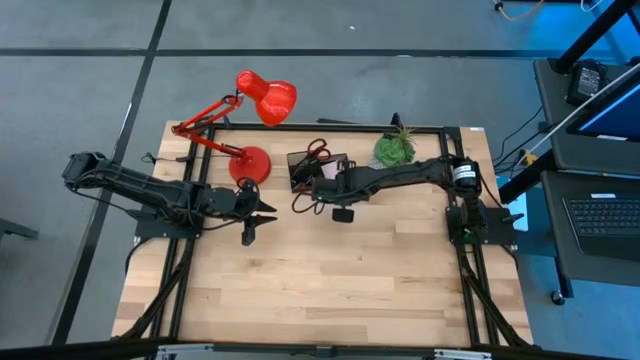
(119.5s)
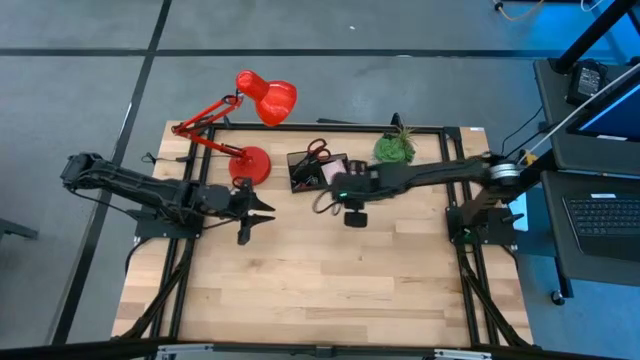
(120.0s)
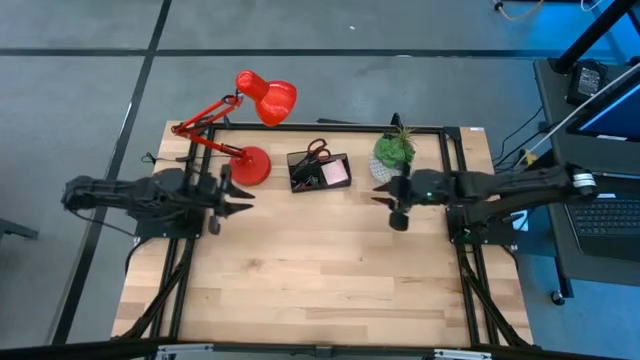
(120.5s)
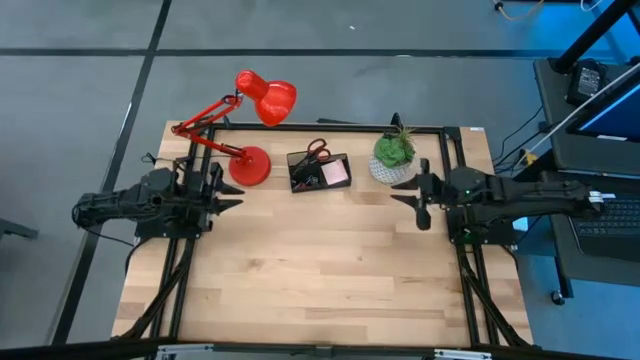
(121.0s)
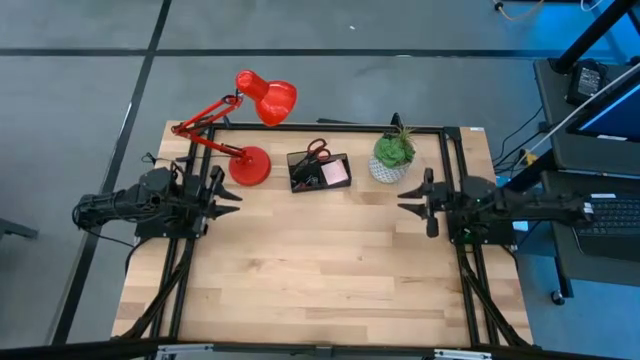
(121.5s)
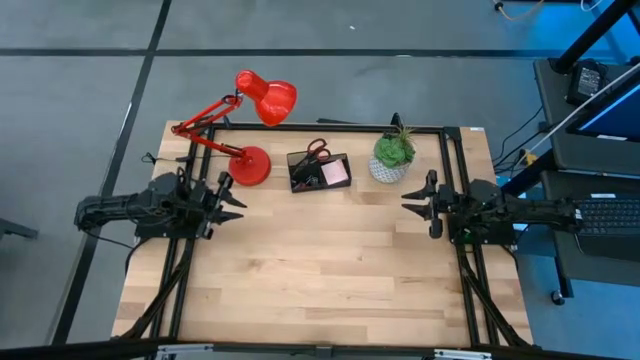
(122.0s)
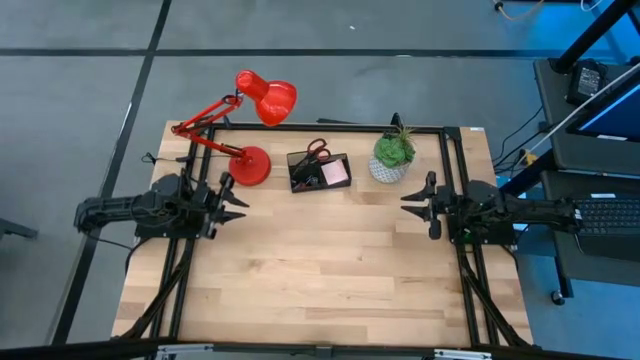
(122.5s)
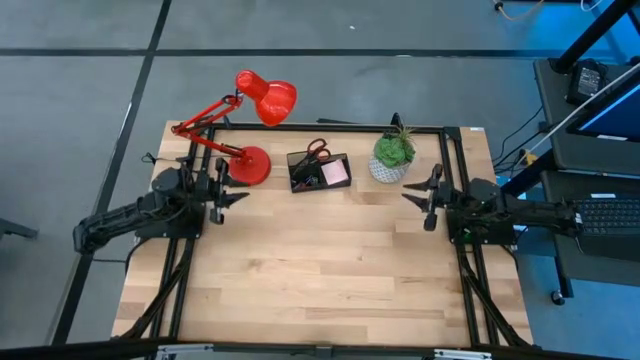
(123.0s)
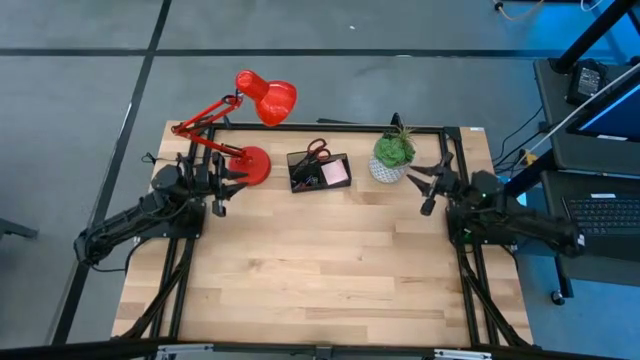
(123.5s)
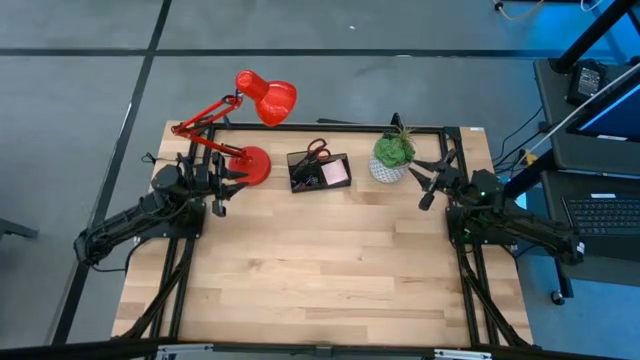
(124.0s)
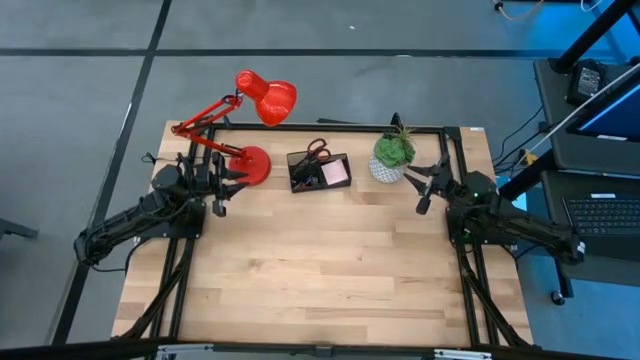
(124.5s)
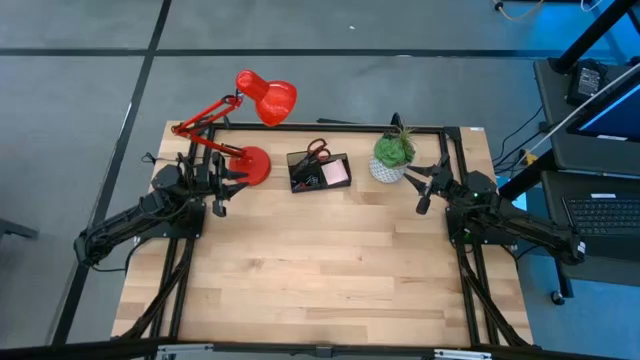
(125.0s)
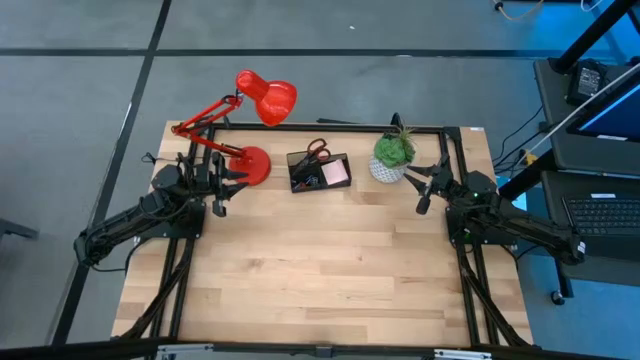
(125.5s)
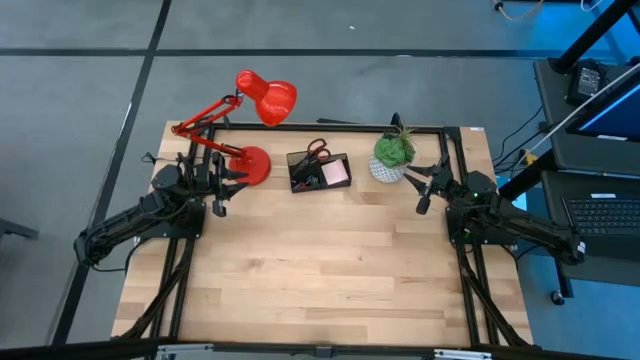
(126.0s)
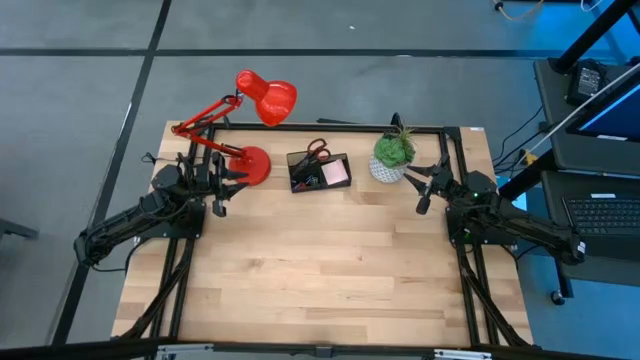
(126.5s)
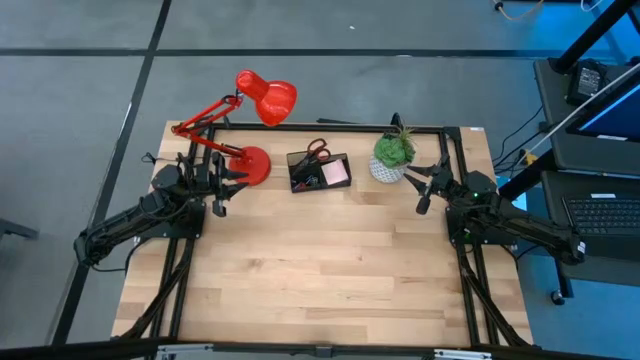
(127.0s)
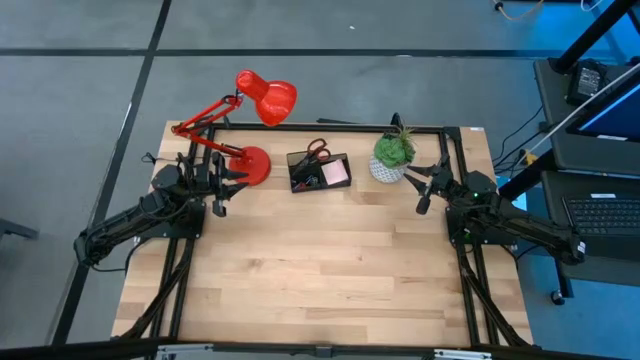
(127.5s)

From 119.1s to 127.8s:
Task: Pick and place office supplies into organizer
Return to Home Position

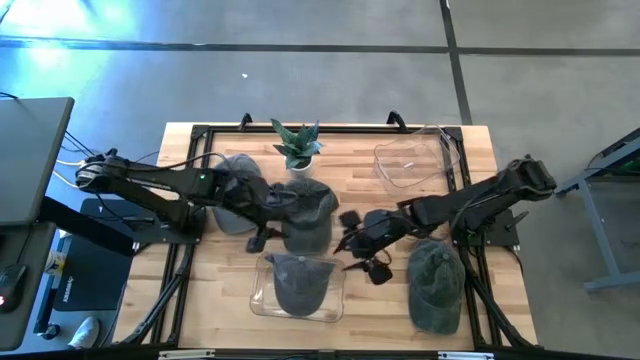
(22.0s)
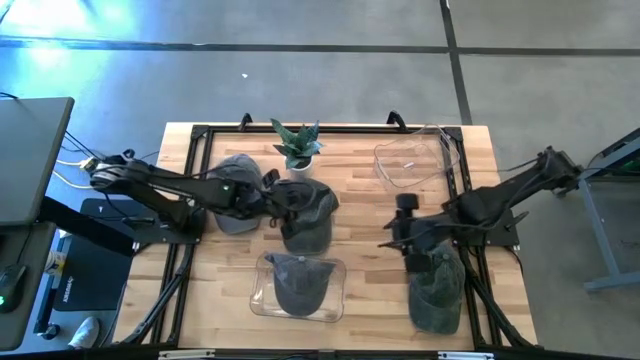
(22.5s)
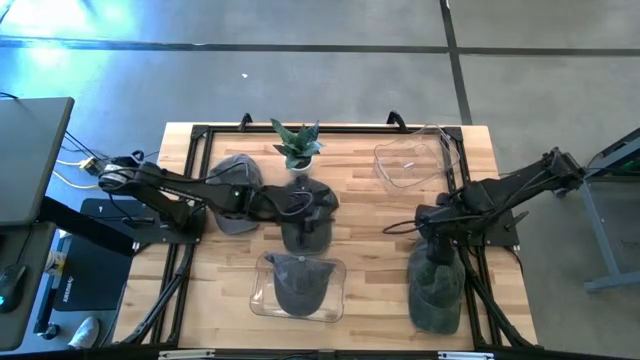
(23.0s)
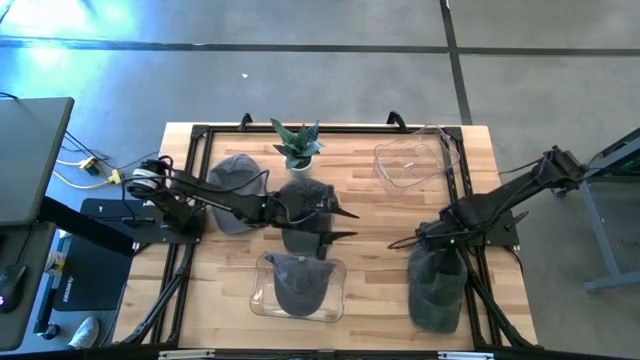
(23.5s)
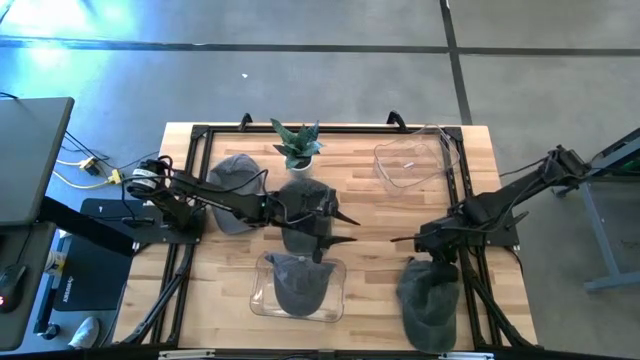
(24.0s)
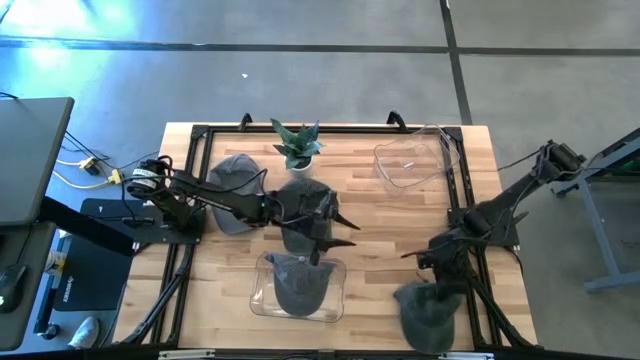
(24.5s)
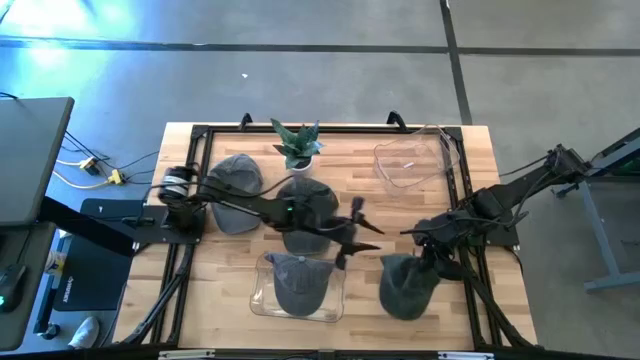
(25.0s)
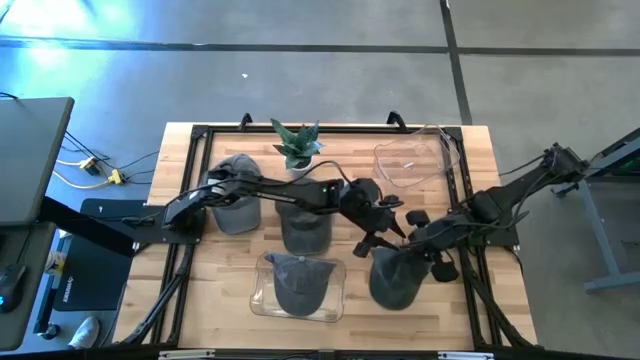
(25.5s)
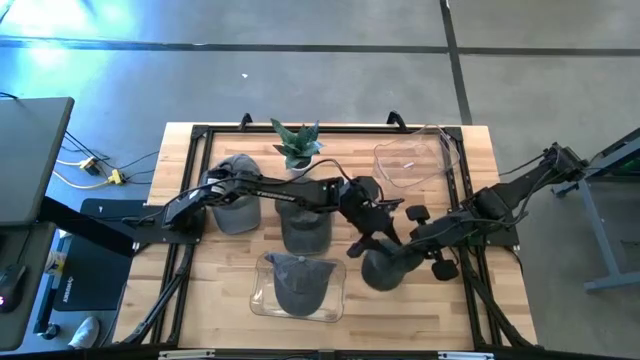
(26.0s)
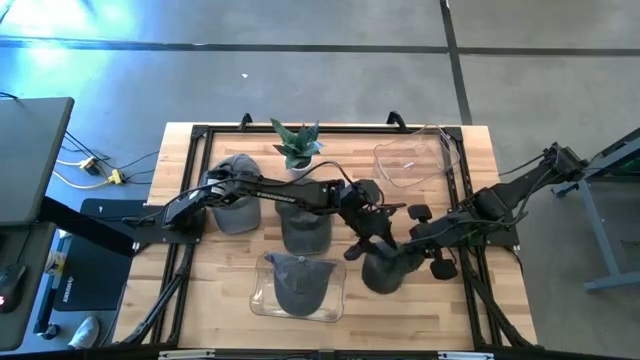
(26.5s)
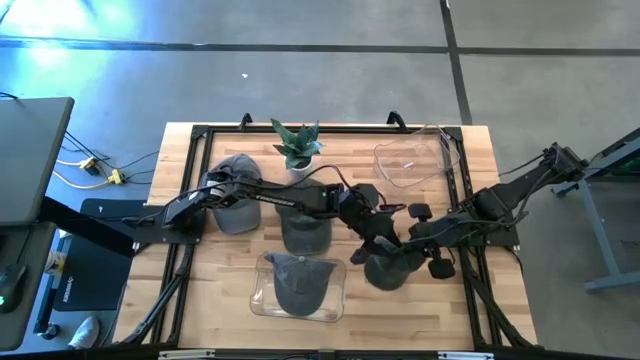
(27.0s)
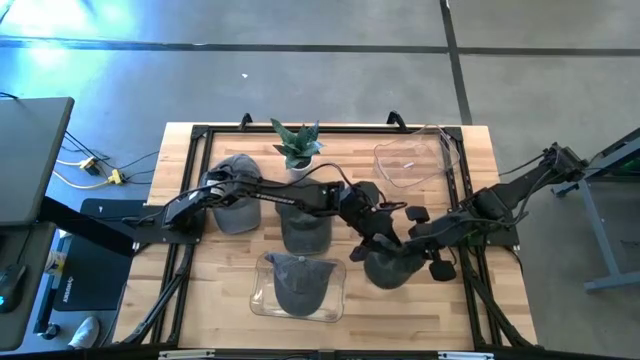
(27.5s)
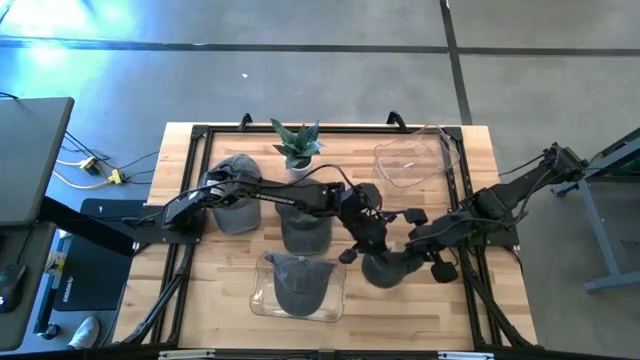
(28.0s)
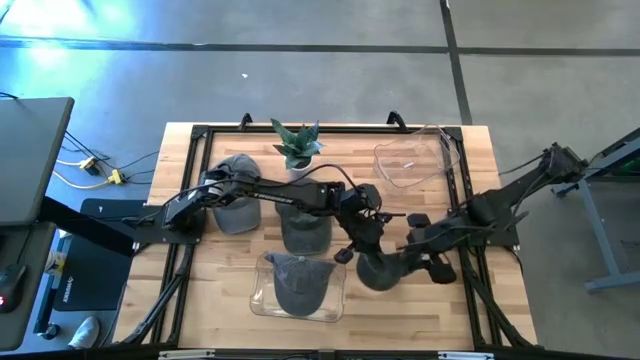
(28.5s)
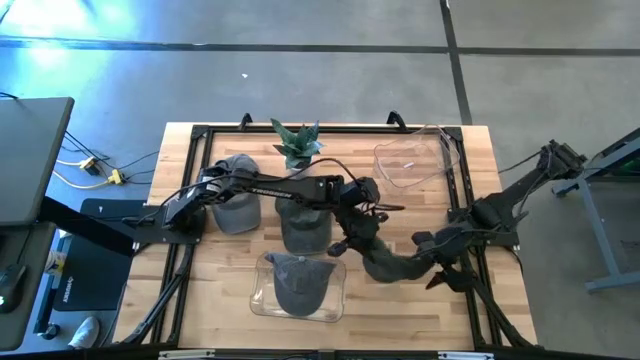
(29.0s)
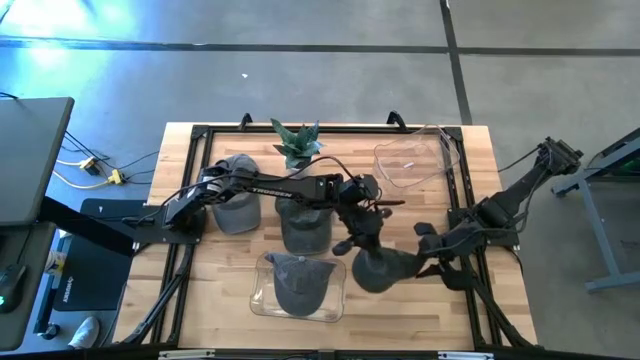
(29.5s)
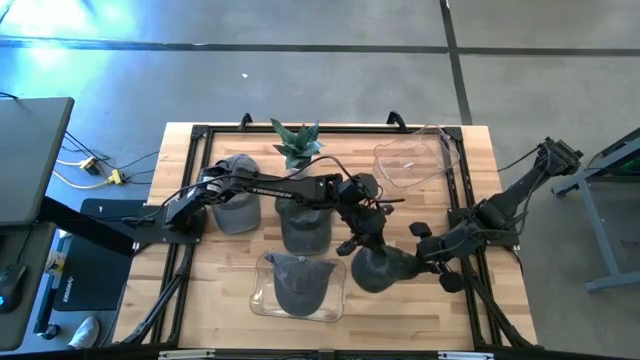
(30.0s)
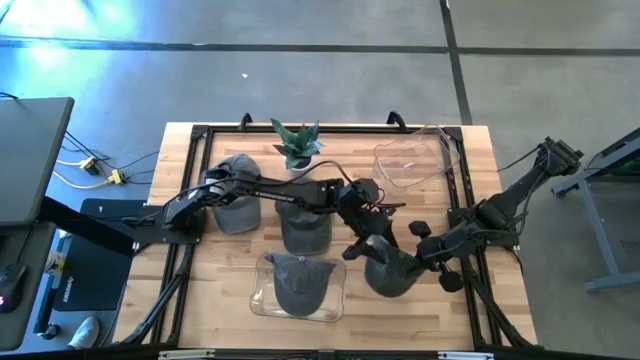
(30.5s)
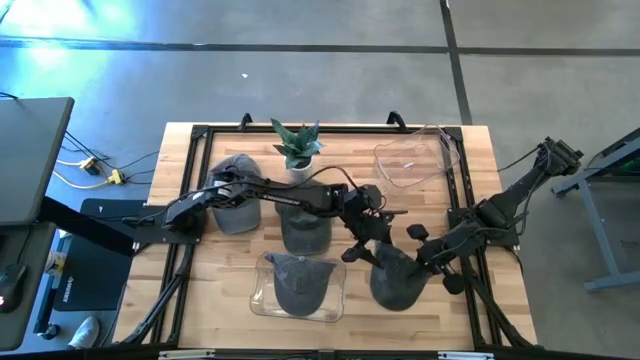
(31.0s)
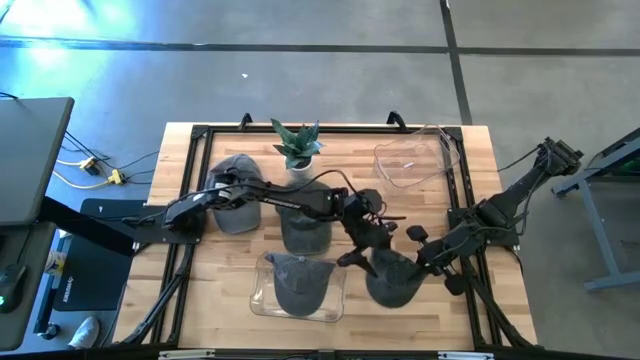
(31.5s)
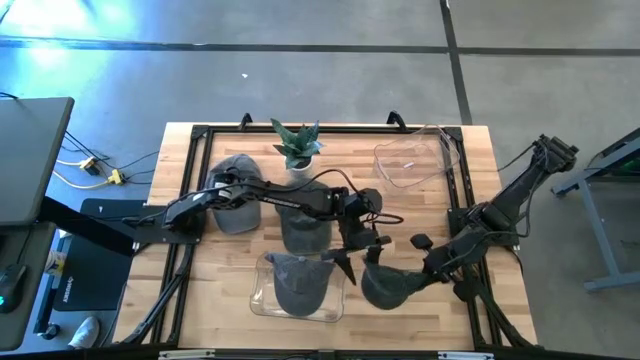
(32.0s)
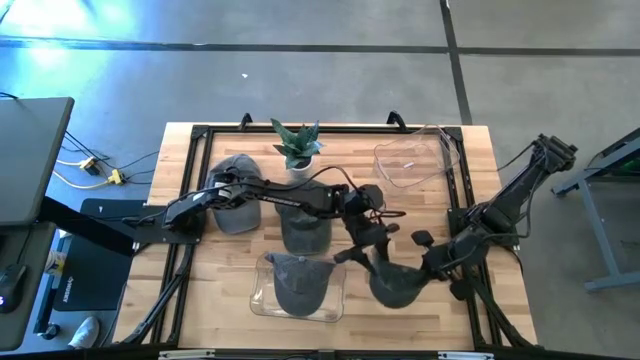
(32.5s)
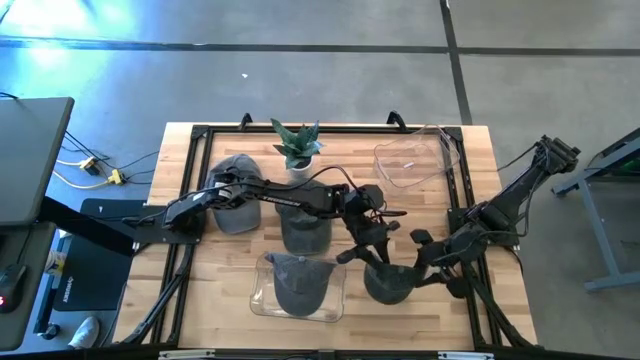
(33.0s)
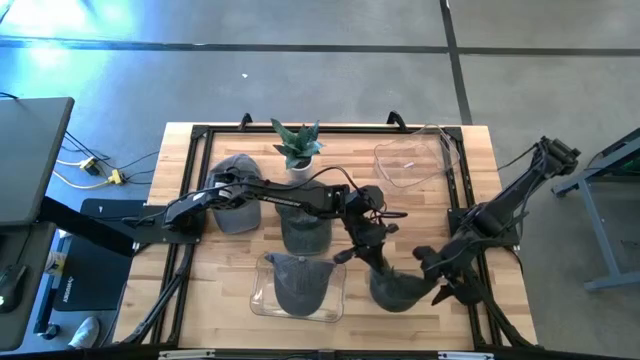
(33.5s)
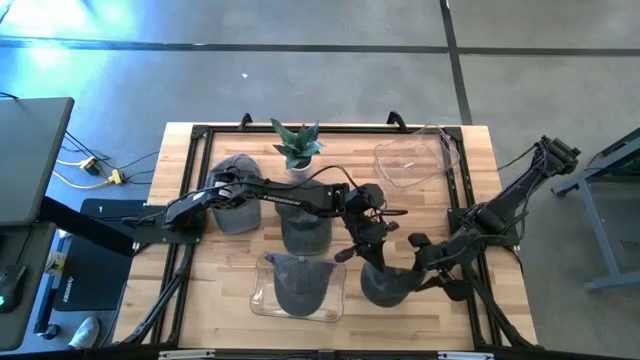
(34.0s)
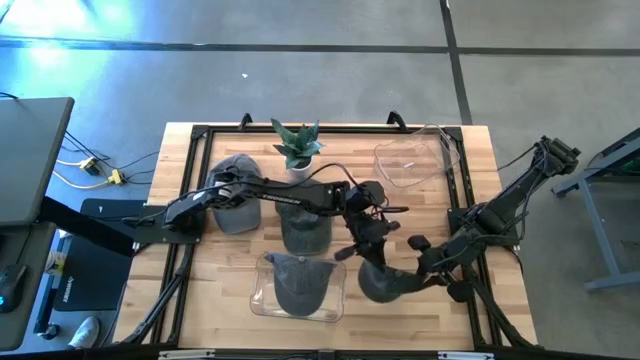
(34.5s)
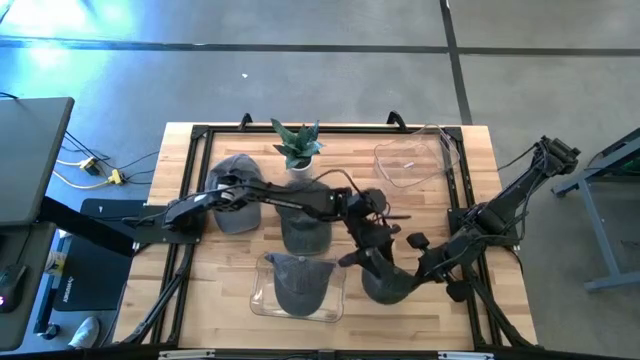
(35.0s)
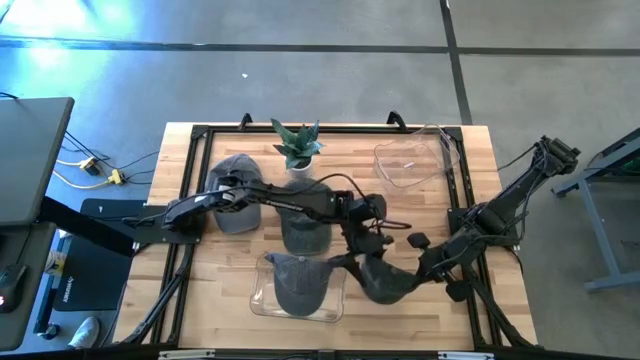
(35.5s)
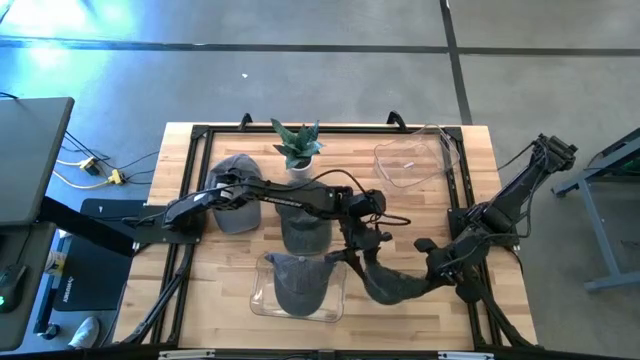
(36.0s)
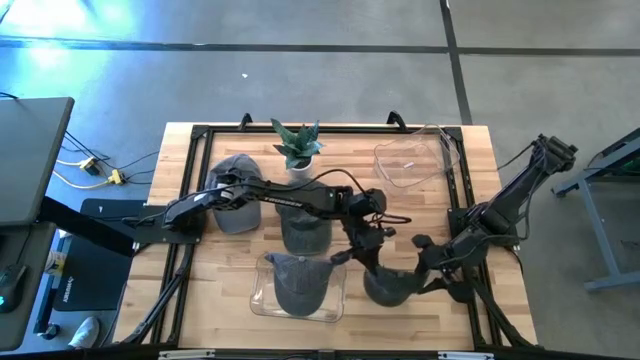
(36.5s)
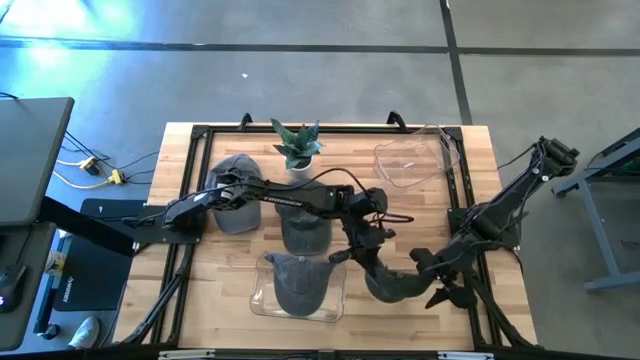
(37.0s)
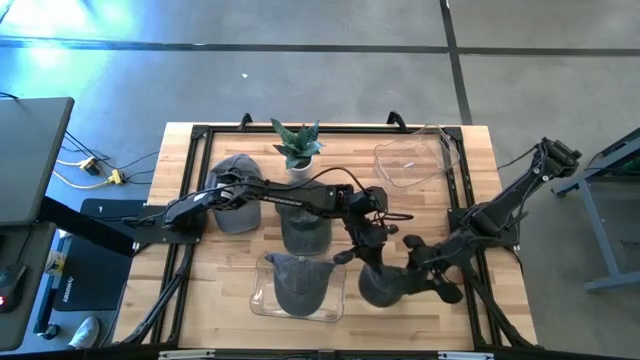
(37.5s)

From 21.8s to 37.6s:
Task: Pick & Place hat
Put the right dark green cap into the top transparent bin
